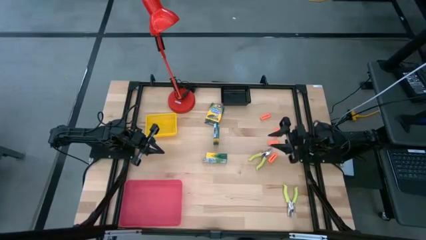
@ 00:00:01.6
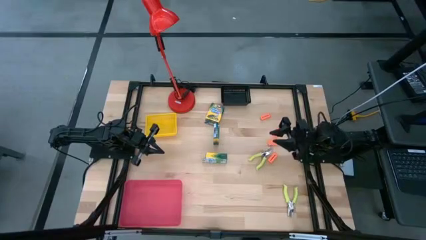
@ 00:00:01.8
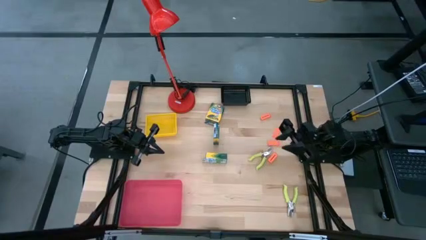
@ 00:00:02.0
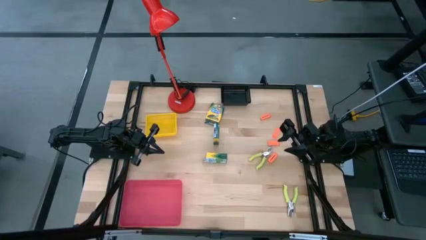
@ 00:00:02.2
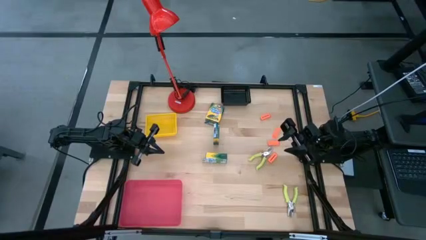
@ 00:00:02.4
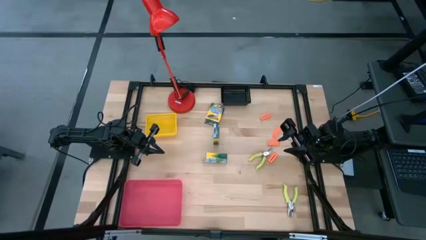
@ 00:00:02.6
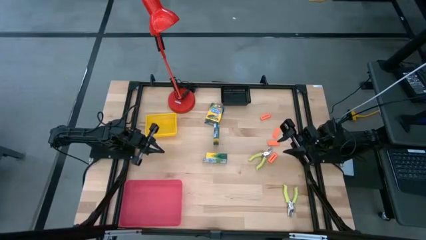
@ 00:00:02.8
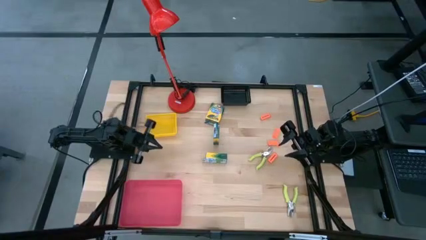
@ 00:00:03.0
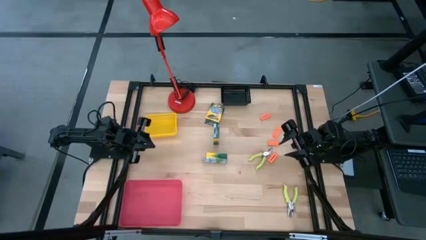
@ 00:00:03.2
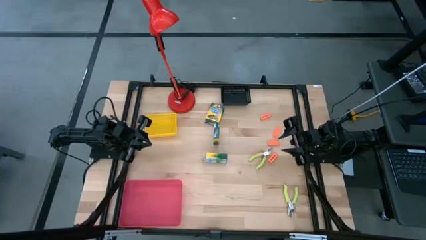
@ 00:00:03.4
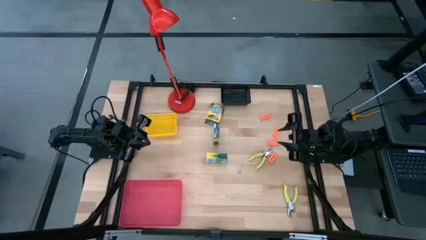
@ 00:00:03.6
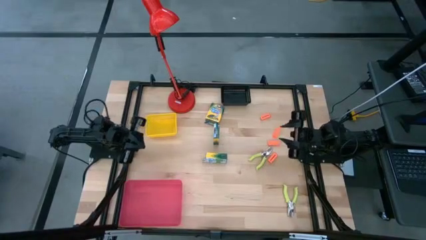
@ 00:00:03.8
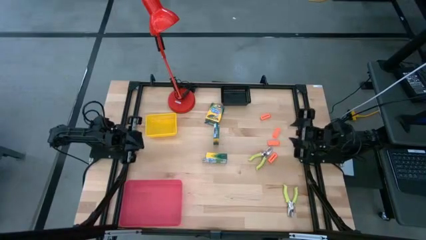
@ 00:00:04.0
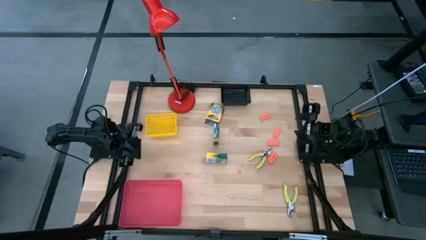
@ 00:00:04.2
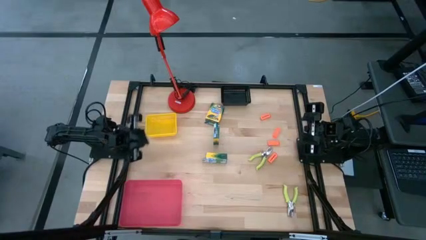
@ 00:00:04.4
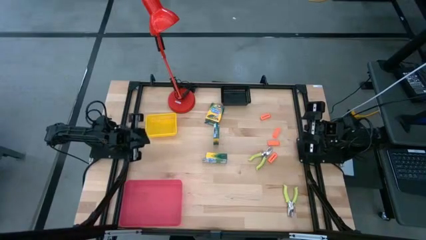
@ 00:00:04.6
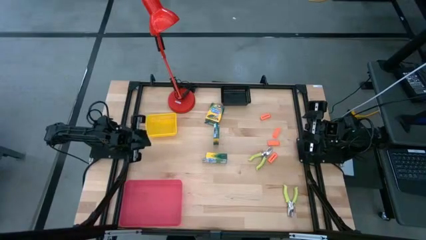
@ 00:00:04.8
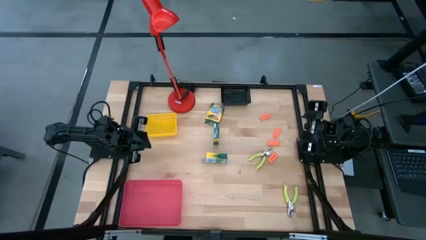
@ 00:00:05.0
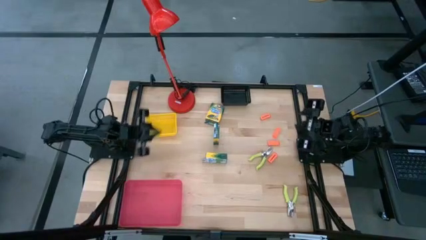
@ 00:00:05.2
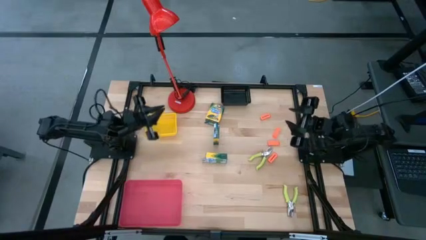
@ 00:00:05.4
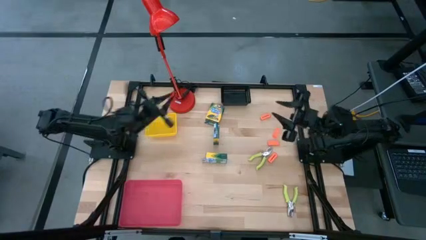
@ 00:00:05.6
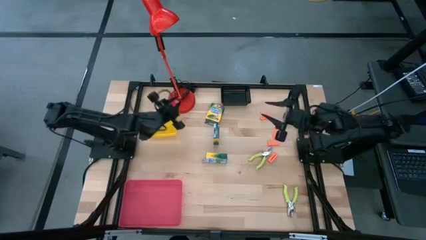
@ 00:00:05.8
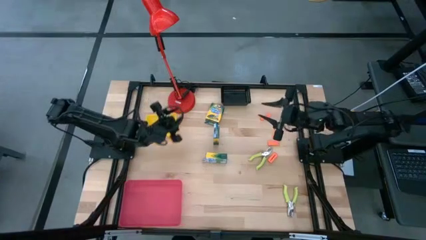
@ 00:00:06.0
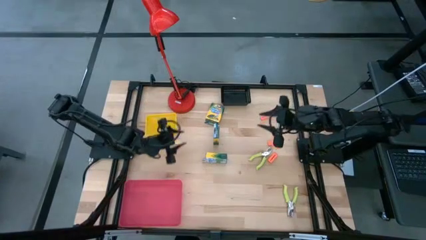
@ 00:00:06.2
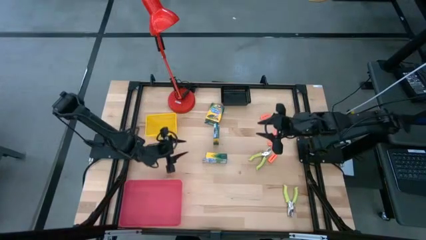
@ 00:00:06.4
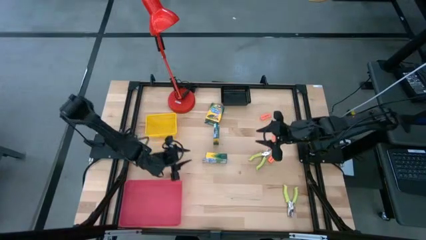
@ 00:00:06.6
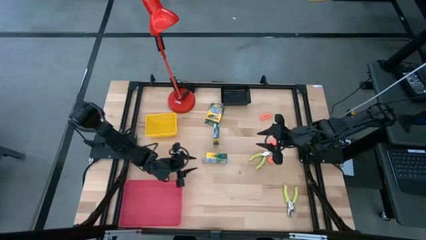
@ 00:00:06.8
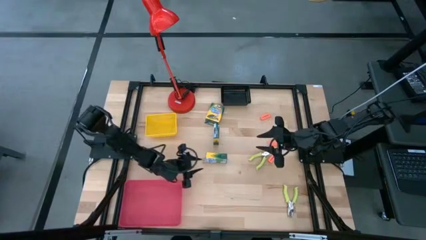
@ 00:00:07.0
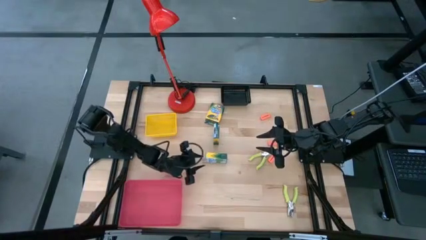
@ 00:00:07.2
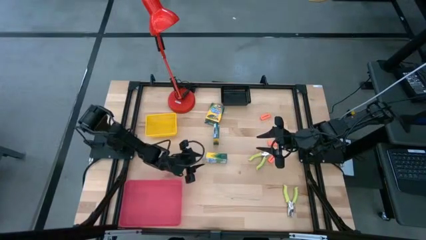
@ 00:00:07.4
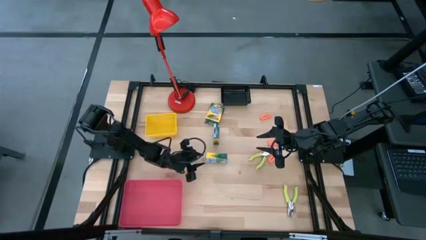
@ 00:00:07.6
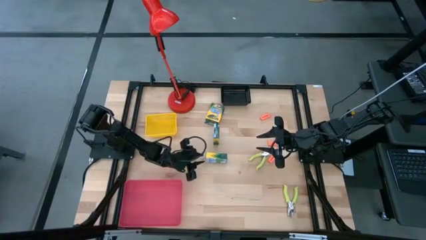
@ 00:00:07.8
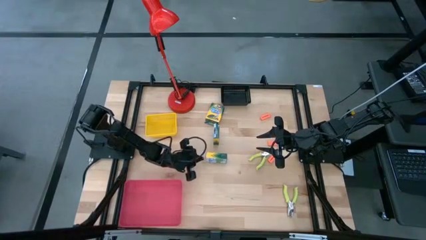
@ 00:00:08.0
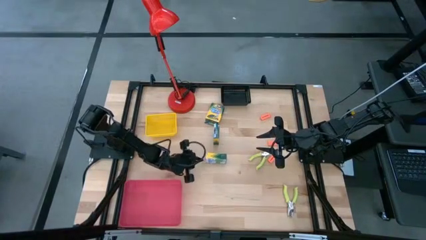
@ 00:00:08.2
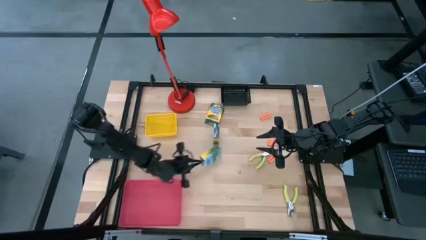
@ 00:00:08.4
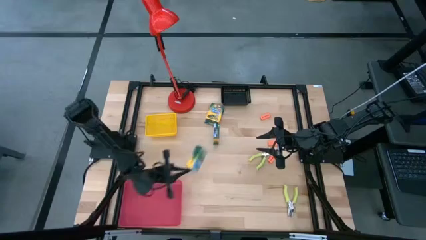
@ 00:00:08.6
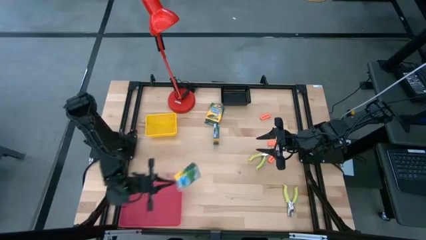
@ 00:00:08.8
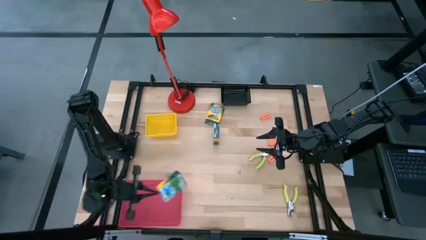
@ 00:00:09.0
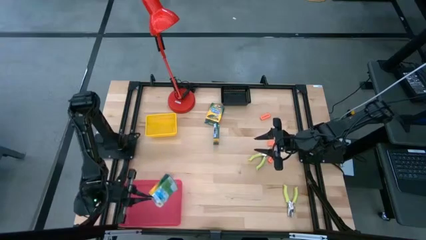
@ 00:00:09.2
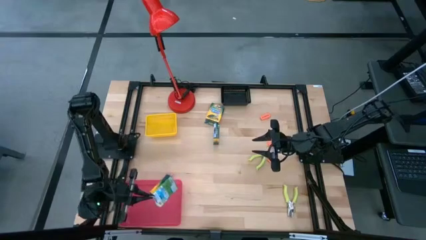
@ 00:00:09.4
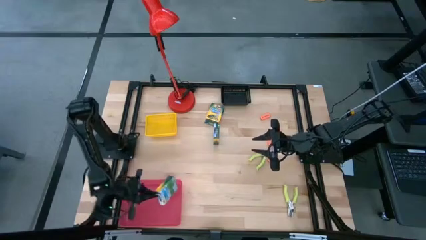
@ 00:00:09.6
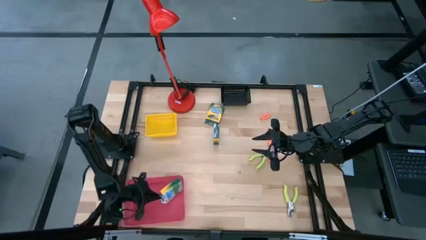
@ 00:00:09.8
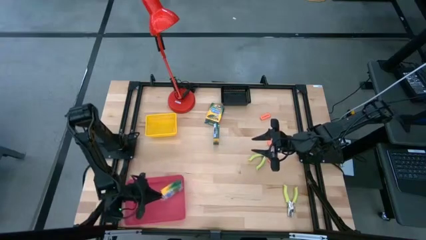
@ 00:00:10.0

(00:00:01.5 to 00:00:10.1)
Task: Pick & Place School Supplies
Put the bottom crayon box into the pink bin

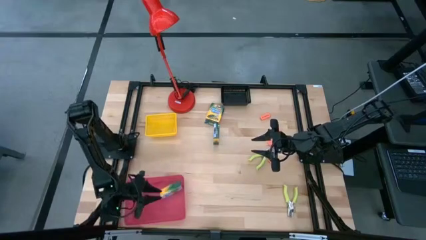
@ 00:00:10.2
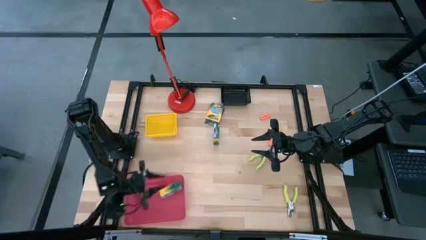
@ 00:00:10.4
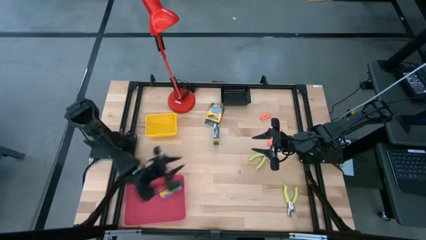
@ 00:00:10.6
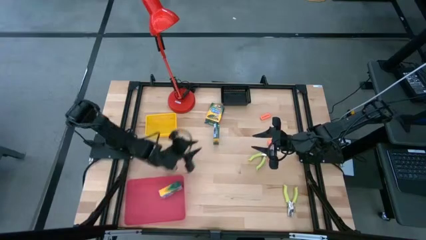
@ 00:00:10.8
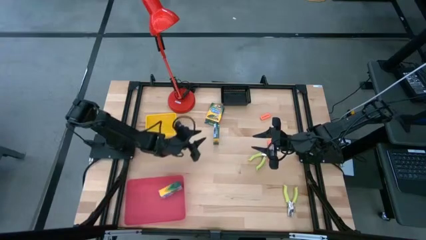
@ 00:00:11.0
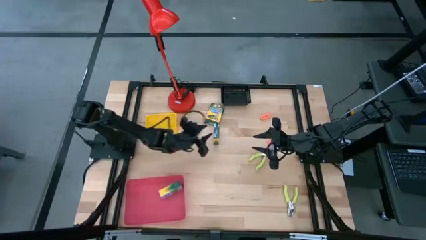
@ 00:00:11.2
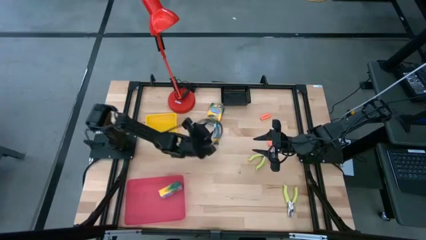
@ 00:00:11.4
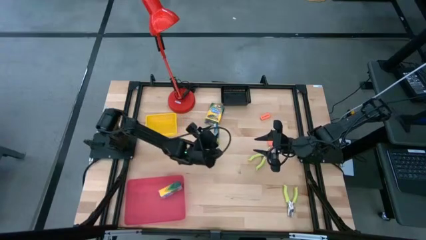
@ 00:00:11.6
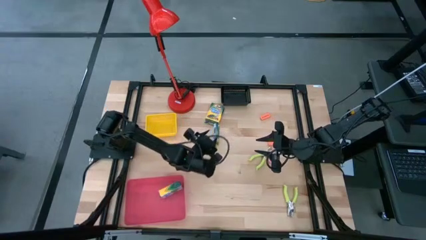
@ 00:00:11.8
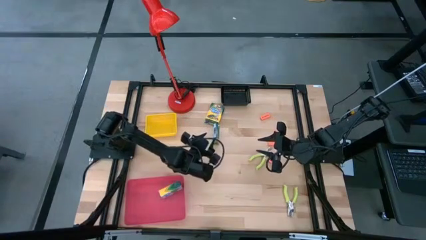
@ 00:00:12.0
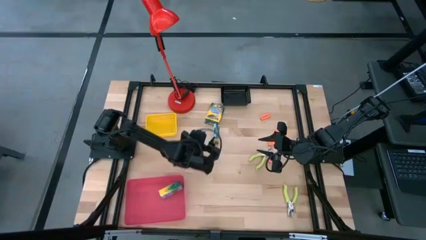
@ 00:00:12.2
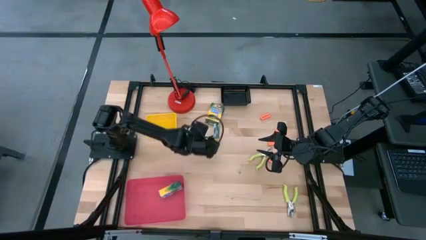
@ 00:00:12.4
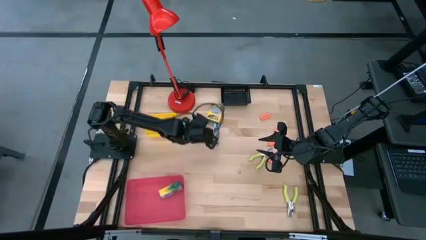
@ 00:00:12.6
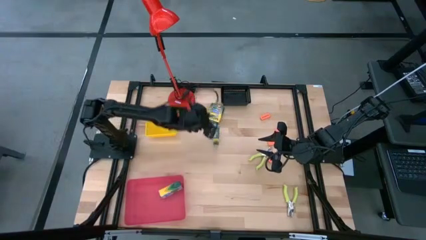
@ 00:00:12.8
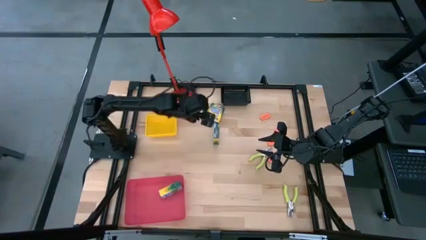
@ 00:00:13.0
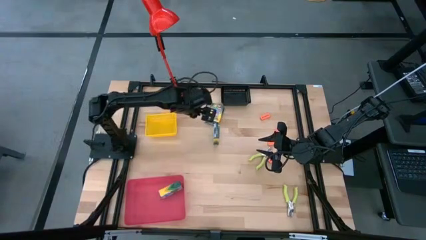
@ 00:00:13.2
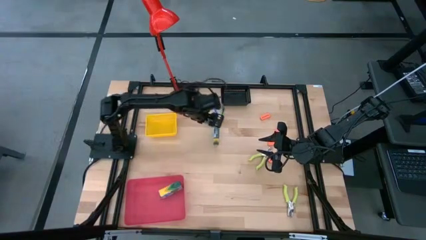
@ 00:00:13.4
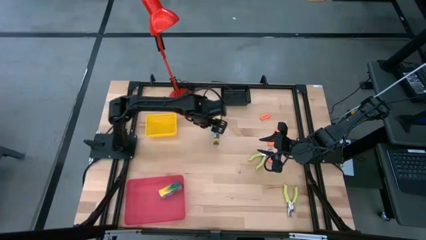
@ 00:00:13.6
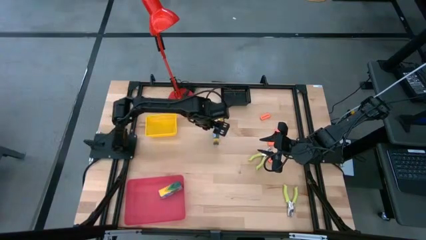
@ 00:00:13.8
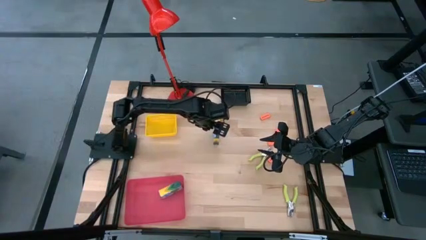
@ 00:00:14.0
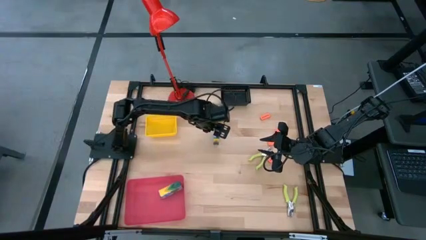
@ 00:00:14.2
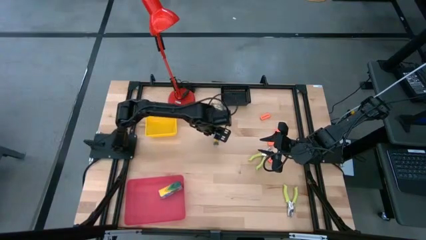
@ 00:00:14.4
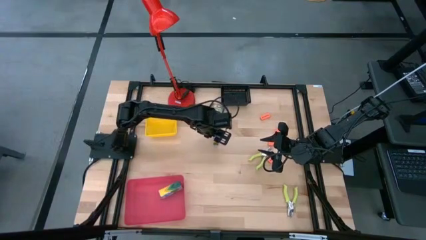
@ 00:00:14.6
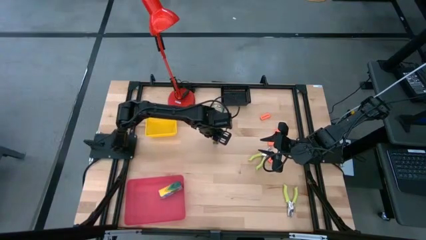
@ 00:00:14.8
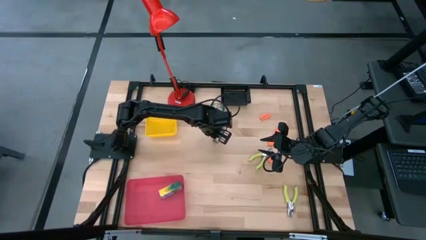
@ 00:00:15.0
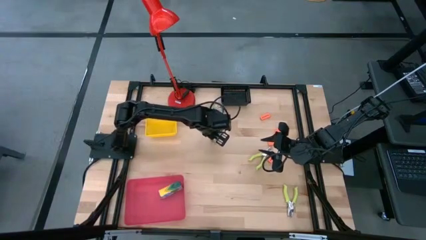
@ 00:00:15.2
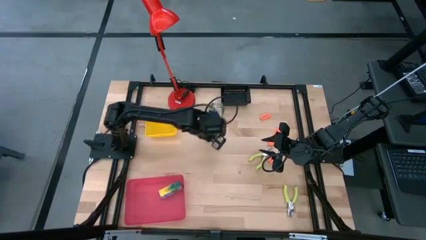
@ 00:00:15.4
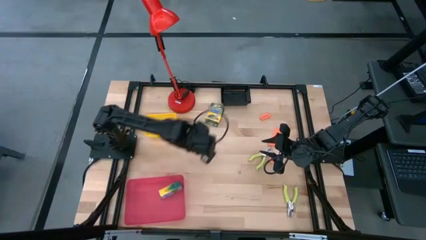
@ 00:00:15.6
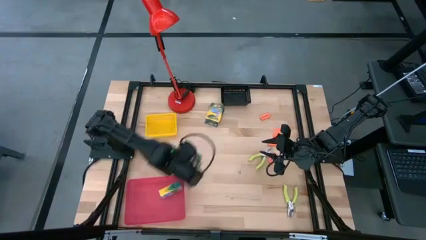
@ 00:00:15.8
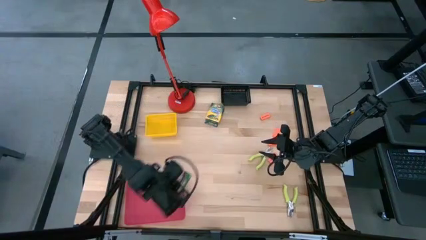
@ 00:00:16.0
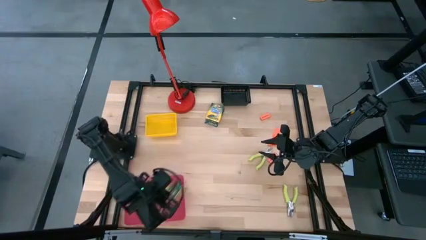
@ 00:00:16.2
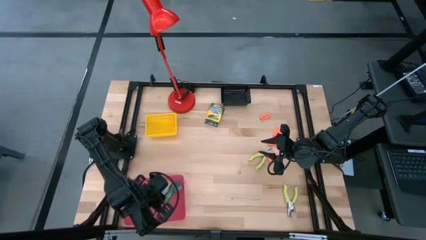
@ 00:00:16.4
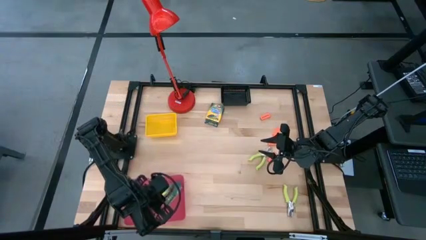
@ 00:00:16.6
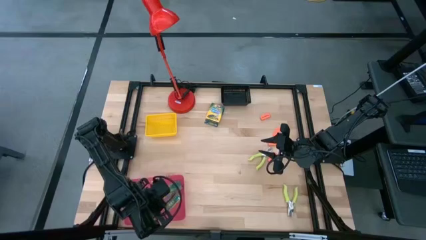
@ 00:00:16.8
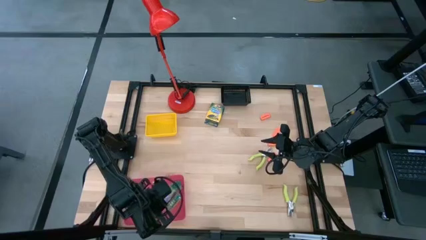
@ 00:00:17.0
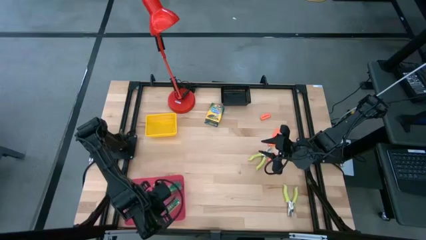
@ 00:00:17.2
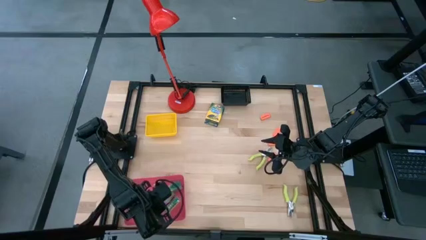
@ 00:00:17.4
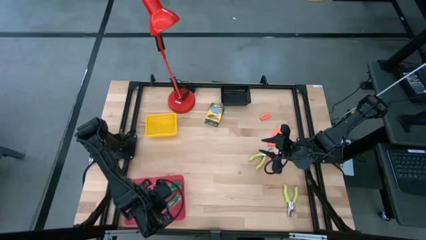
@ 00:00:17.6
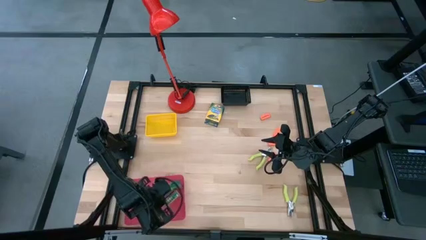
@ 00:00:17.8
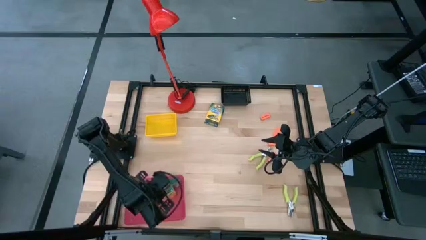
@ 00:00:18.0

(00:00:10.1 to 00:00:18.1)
Put the bottom crayon box into the pink bin
